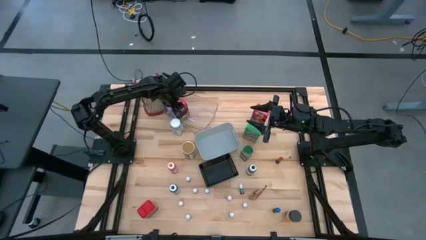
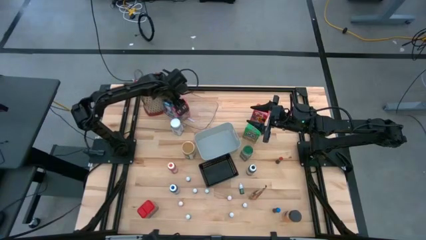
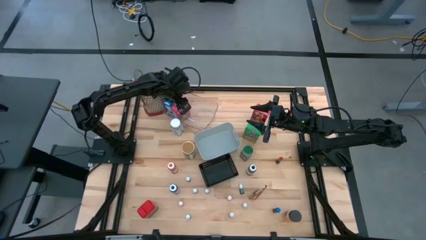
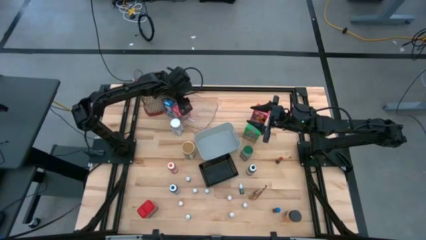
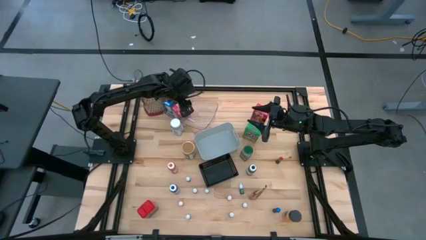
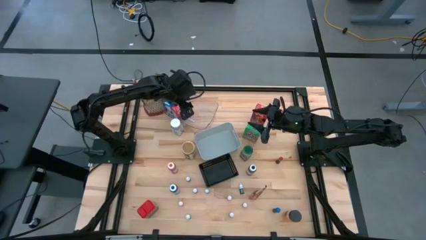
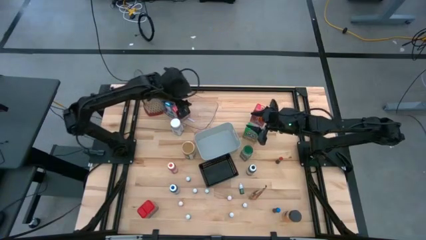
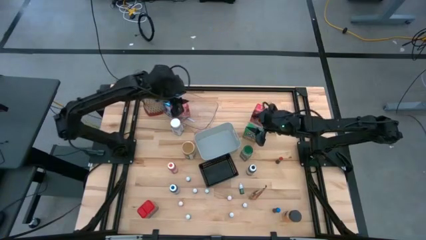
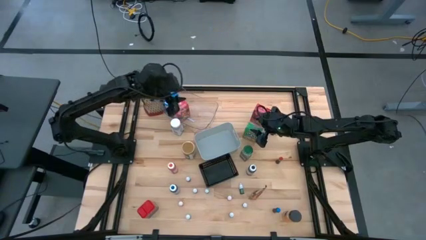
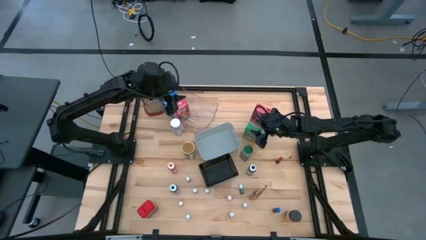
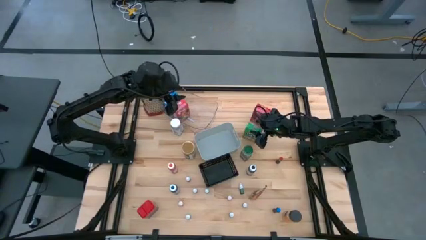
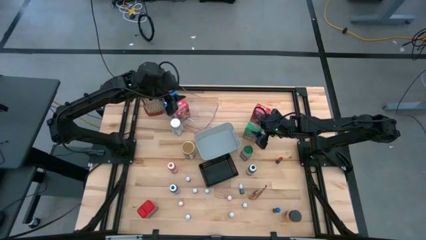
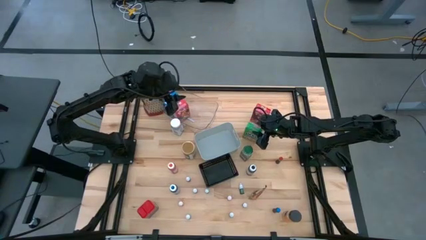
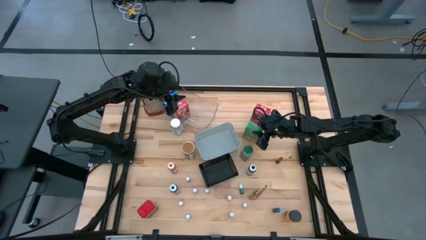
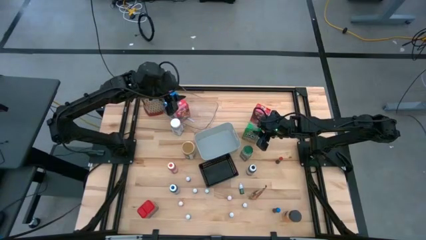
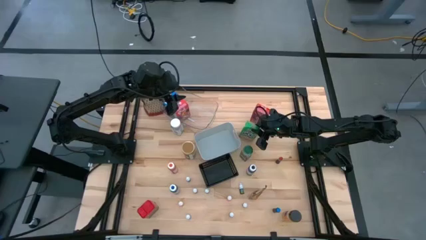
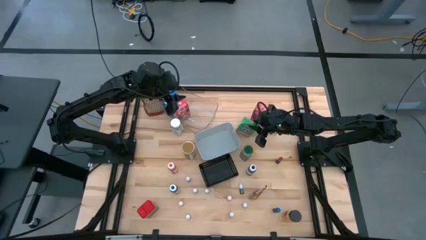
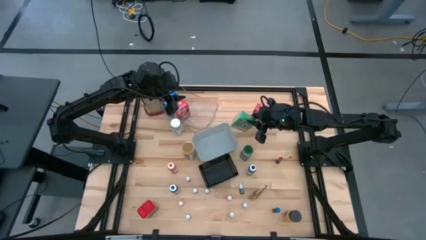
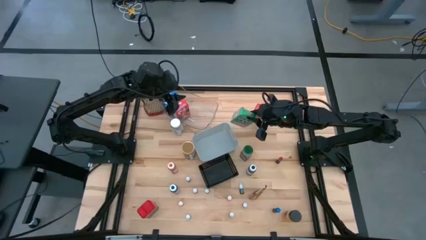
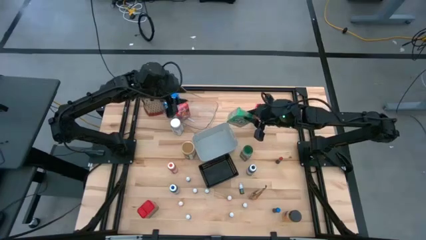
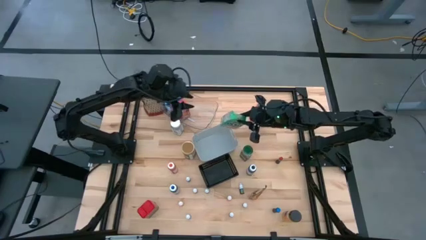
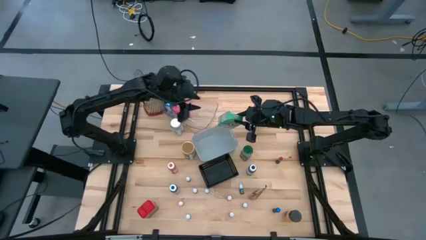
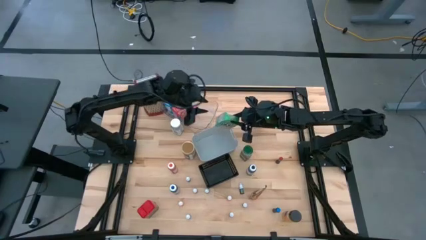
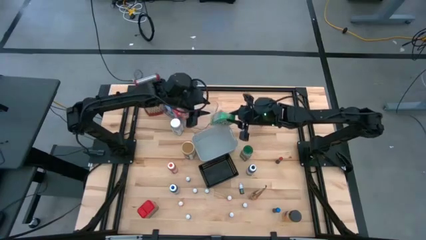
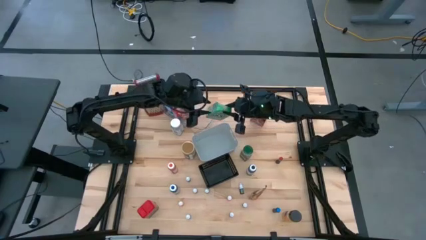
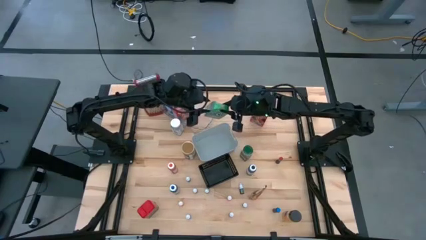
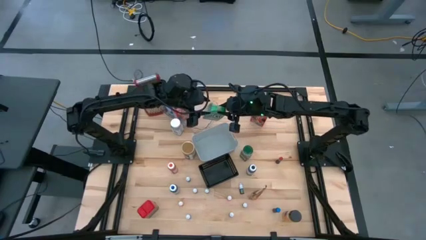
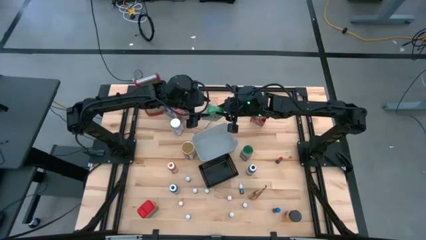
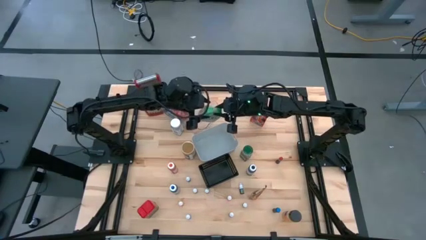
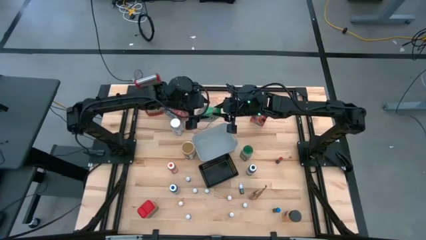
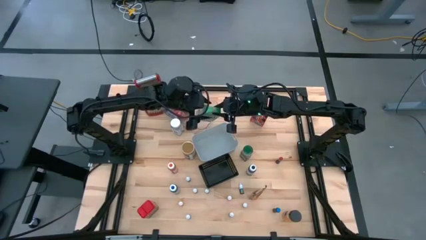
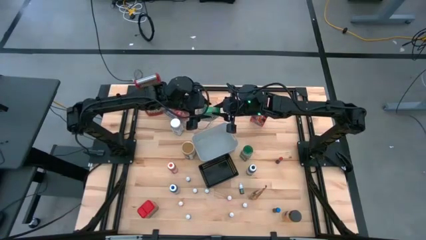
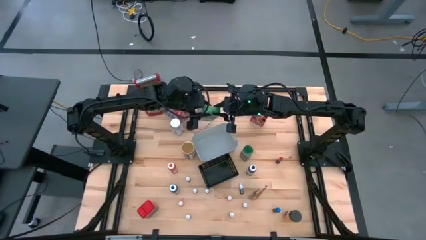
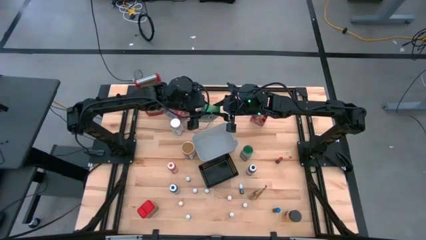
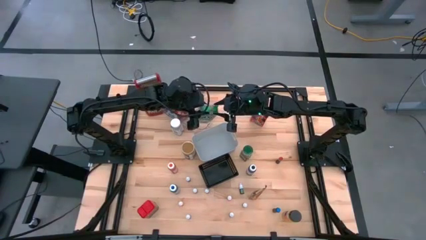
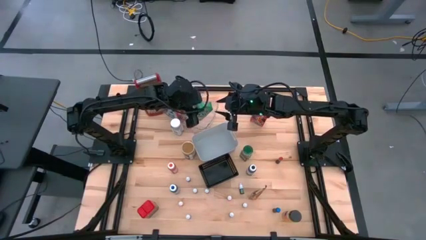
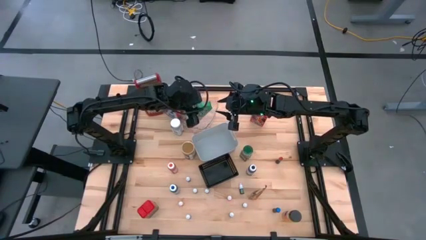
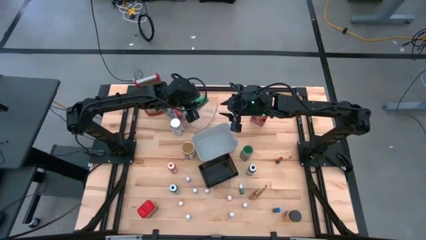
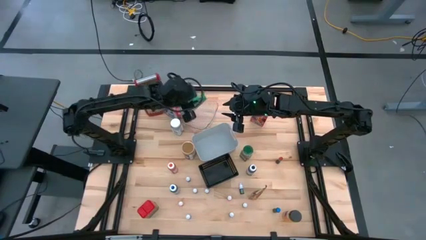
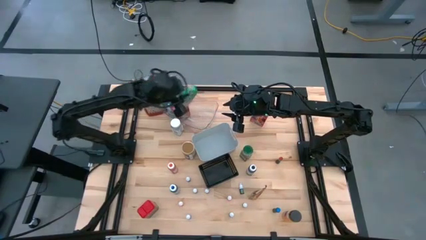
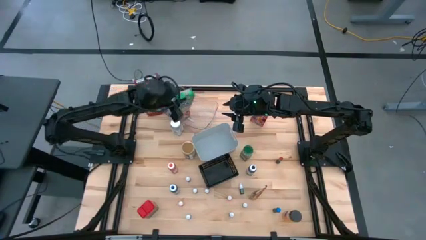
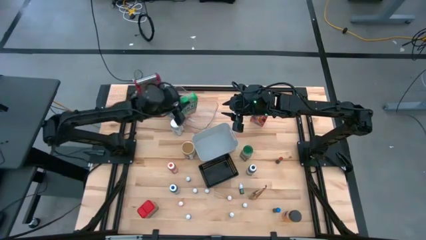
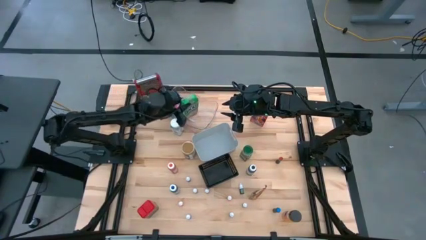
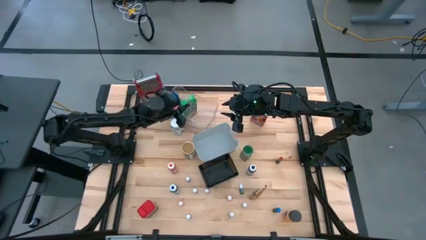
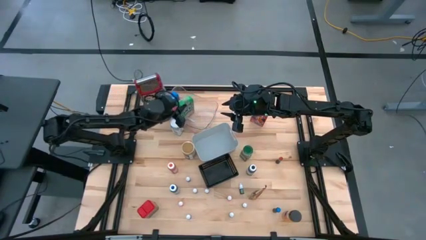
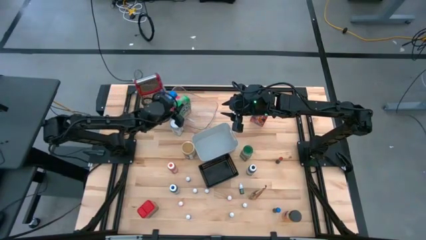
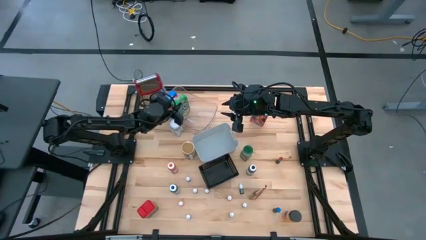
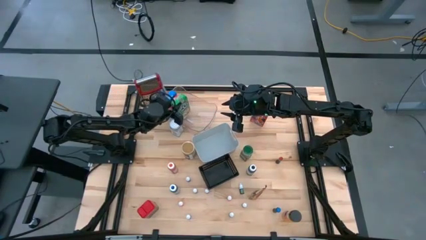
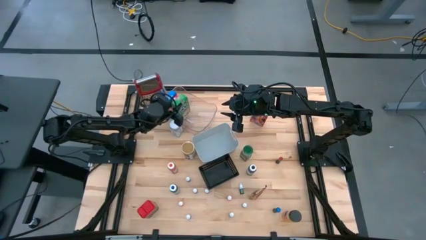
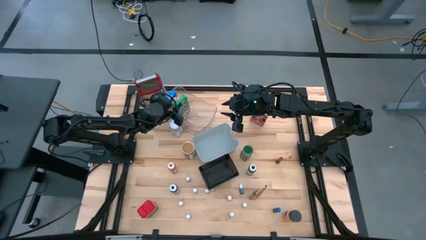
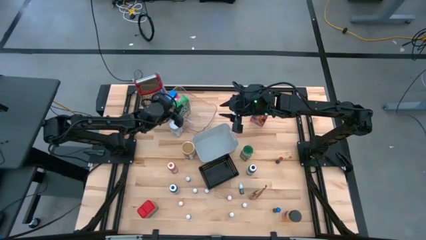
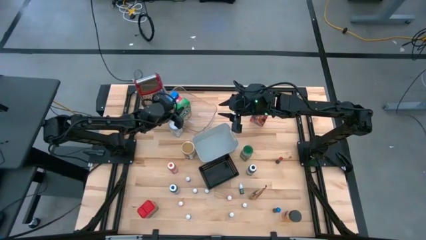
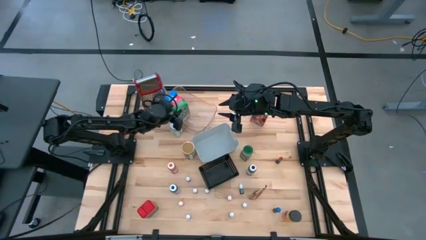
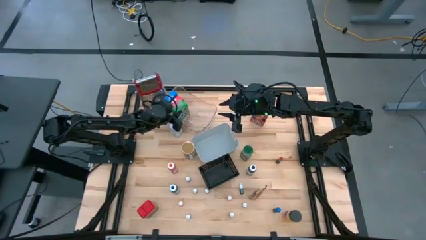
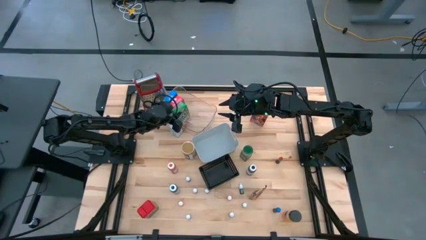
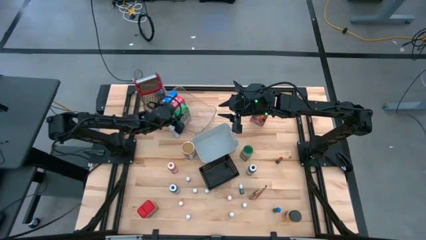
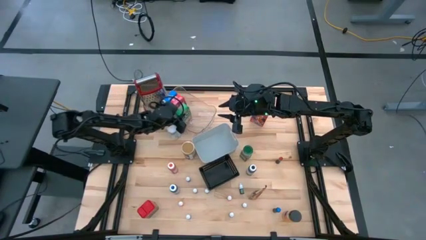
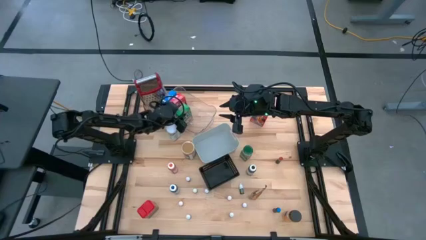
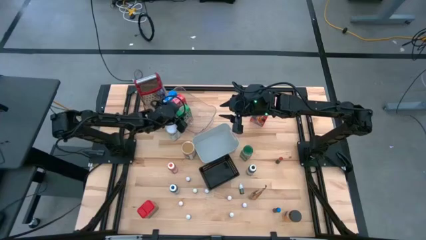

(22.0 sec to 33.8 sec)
Task: Pick & Place Kitchen Items
Put the green cereal box into the transparent bin

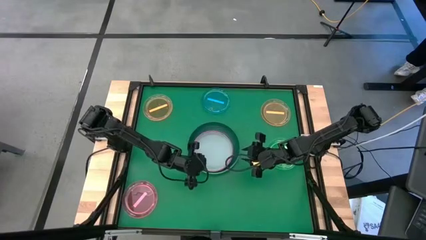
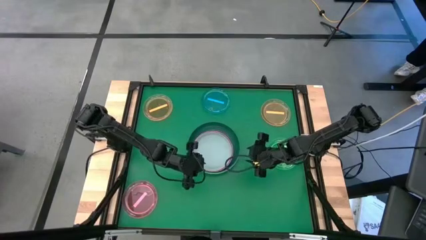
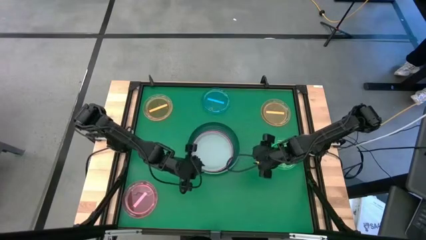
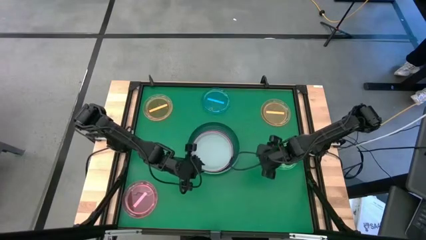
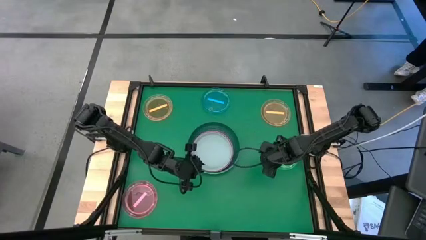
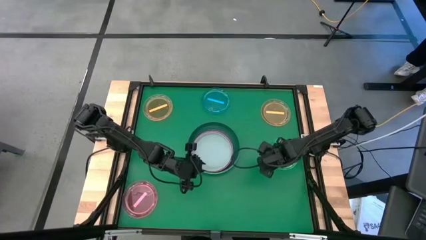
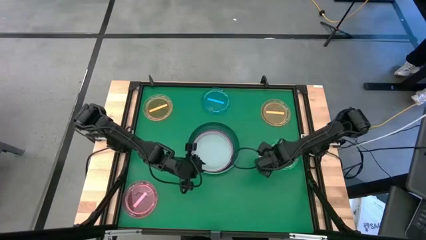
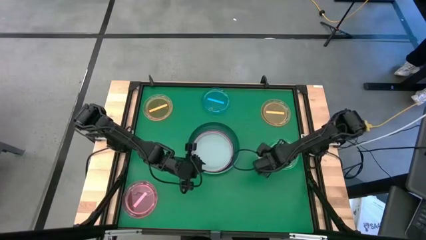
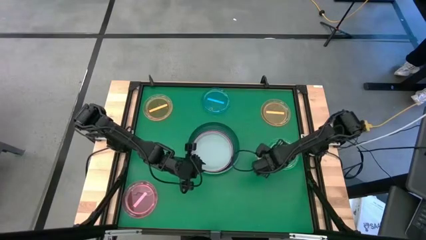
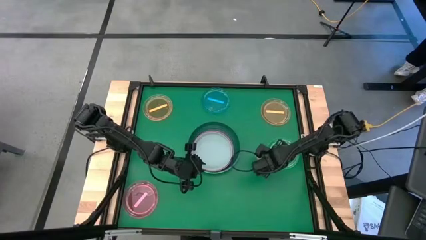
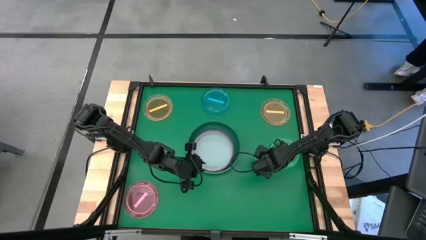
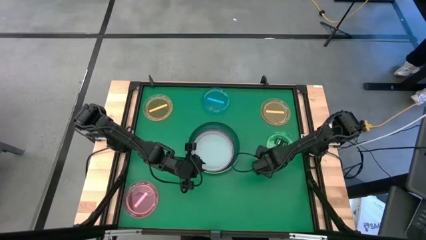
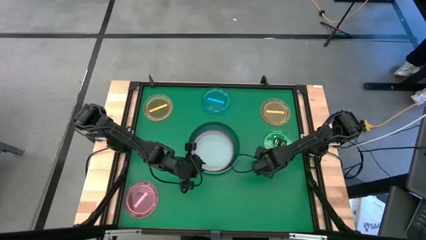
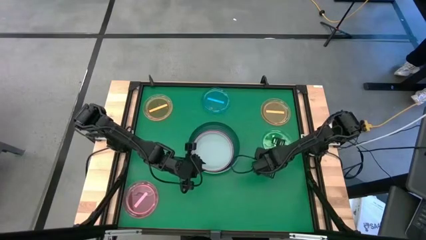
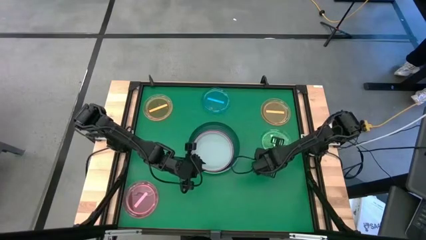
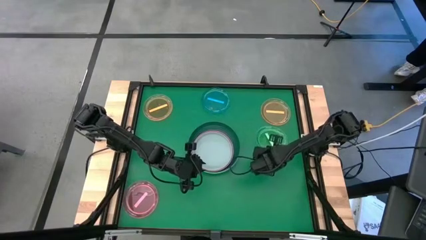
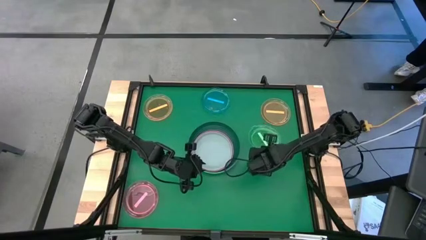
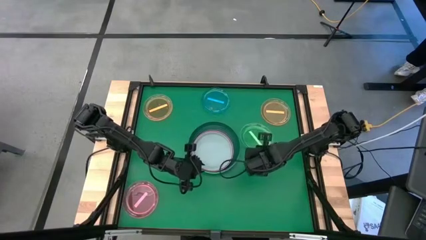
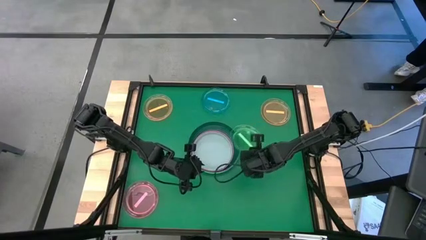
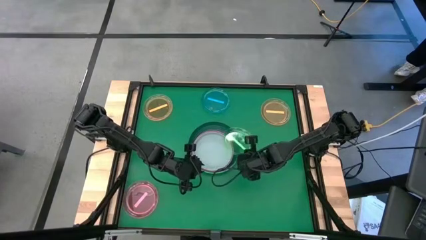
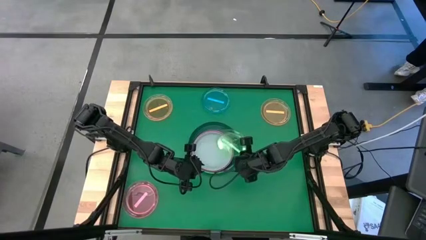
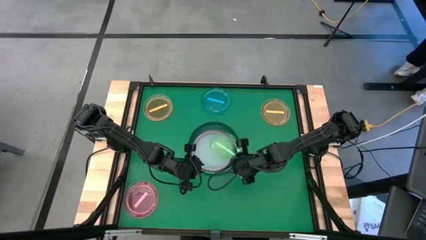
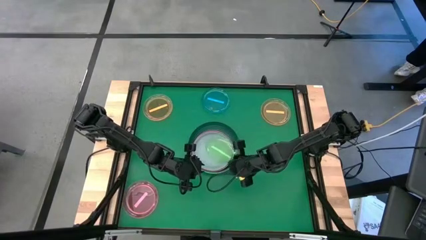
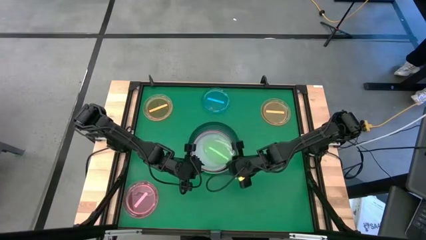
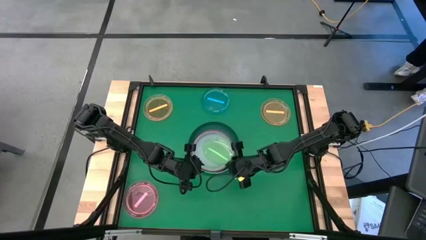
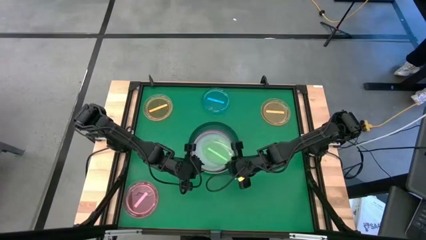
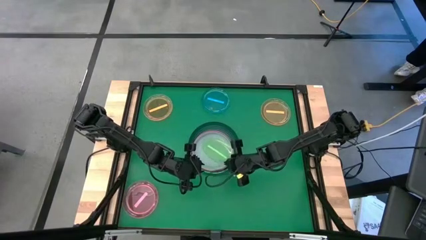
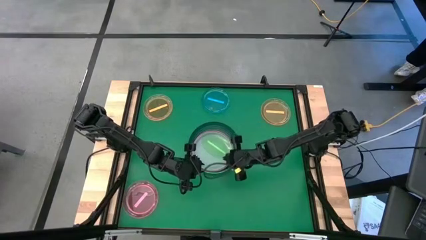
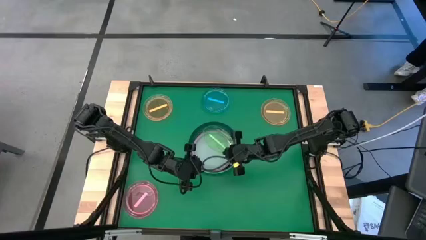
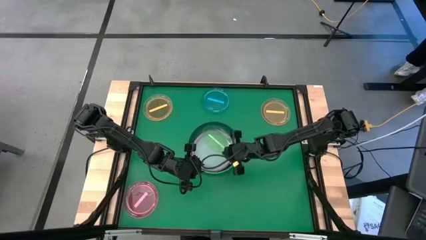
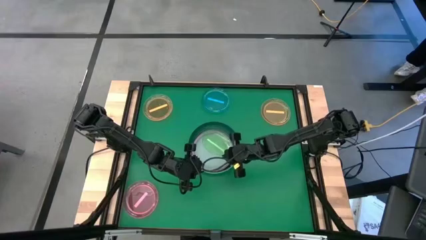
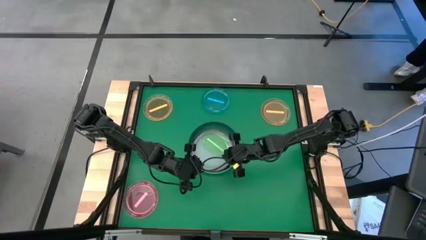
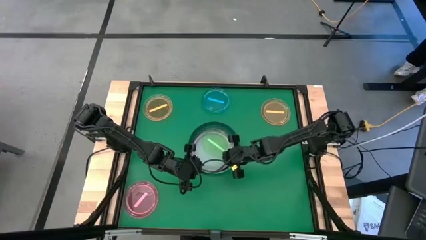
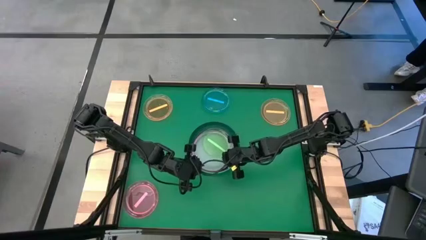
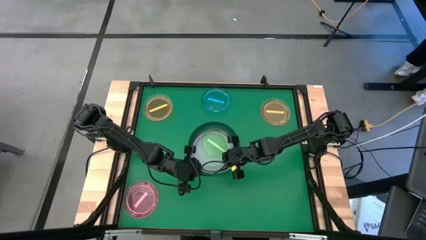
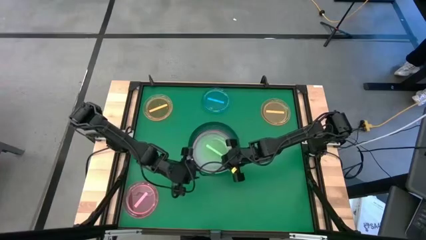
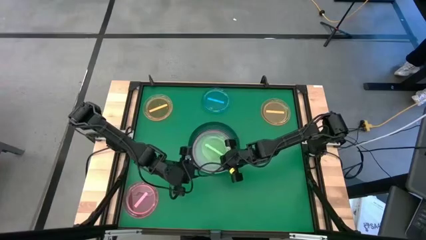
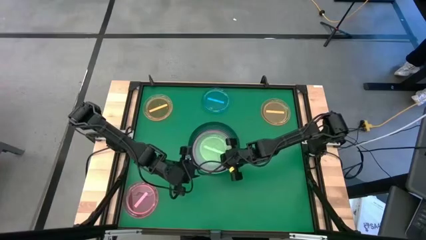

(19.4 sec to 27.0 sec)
Task: Stack plastic plates
Stack the green transparent plate on top of the gray plate
